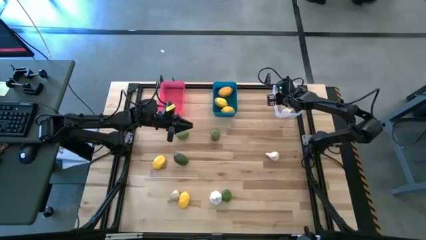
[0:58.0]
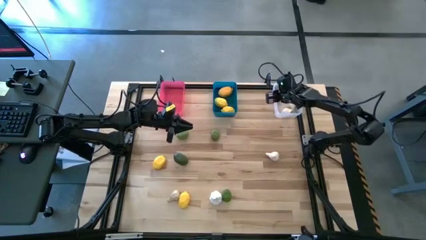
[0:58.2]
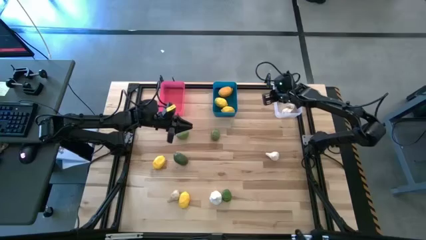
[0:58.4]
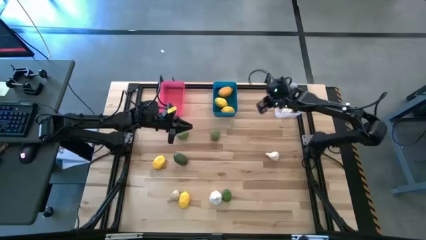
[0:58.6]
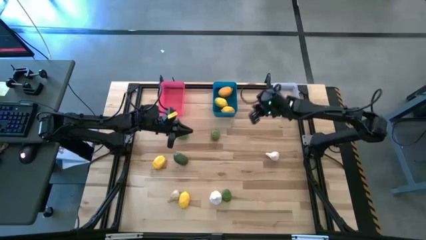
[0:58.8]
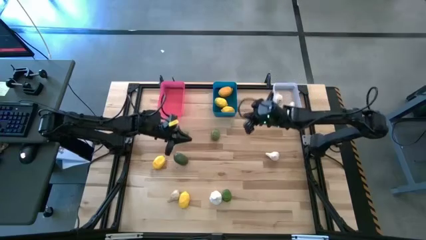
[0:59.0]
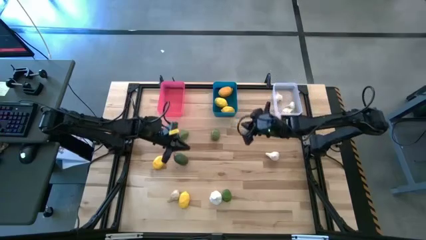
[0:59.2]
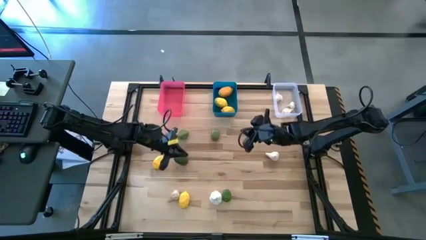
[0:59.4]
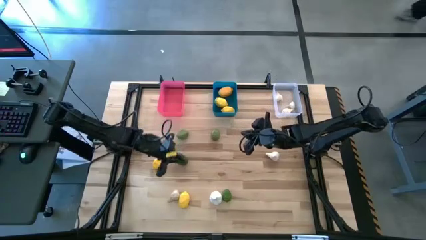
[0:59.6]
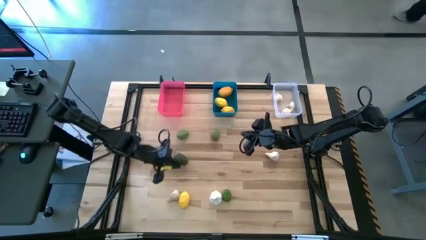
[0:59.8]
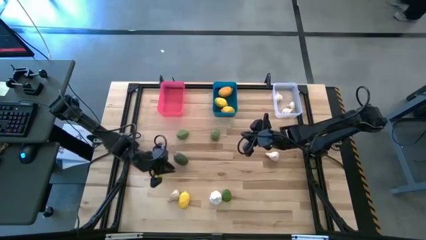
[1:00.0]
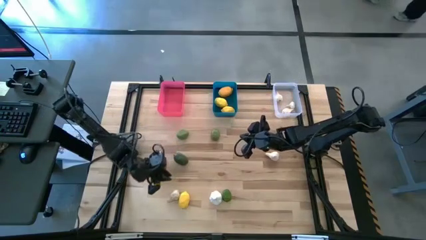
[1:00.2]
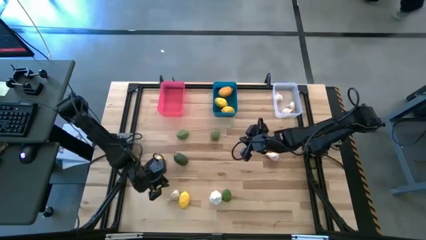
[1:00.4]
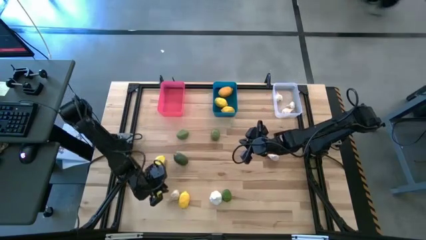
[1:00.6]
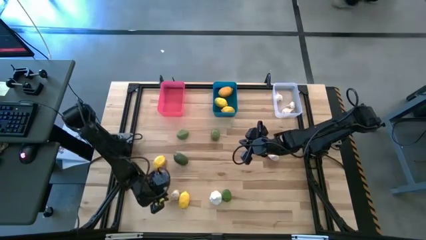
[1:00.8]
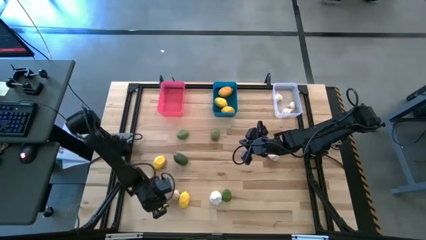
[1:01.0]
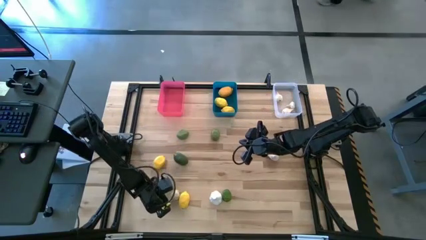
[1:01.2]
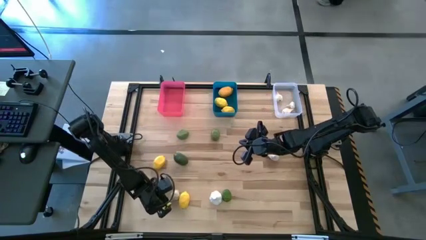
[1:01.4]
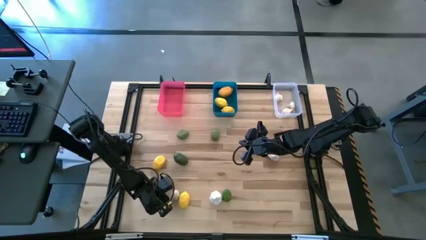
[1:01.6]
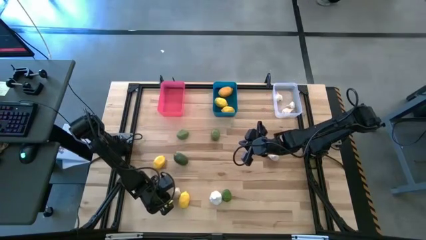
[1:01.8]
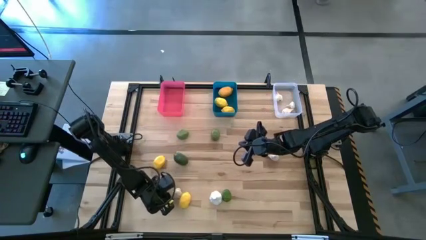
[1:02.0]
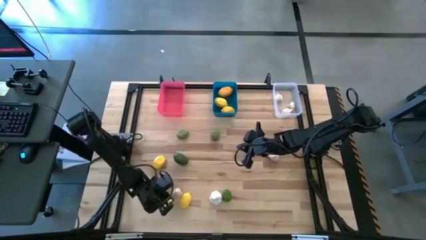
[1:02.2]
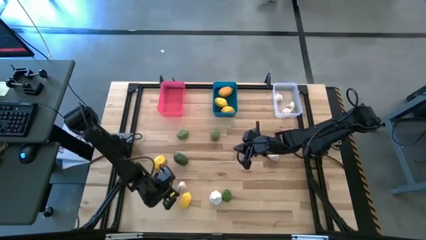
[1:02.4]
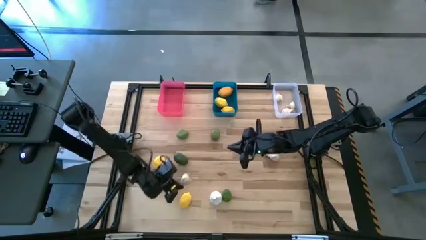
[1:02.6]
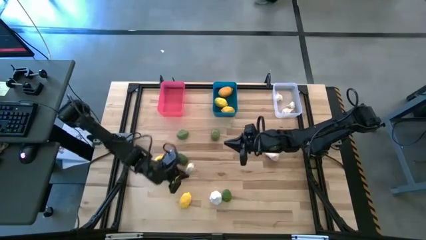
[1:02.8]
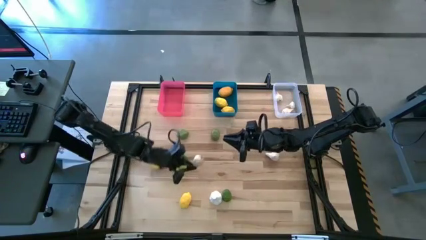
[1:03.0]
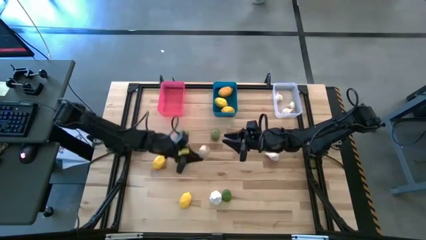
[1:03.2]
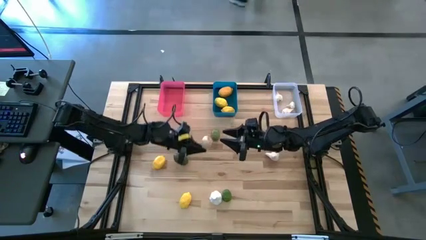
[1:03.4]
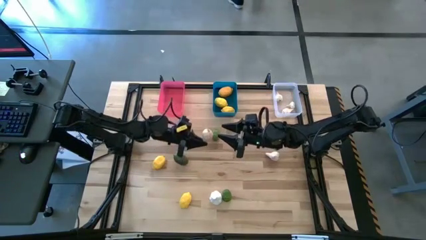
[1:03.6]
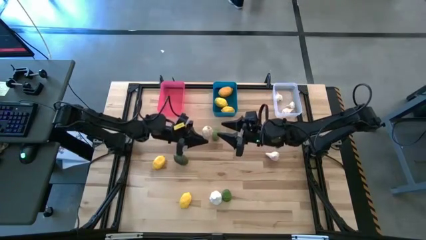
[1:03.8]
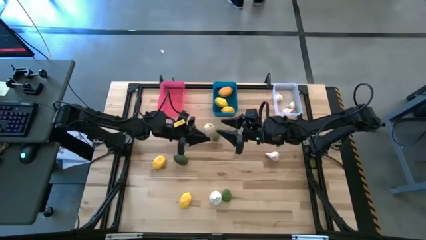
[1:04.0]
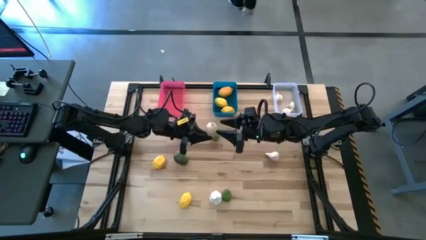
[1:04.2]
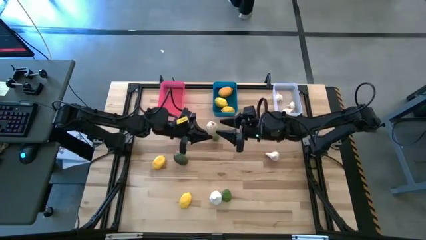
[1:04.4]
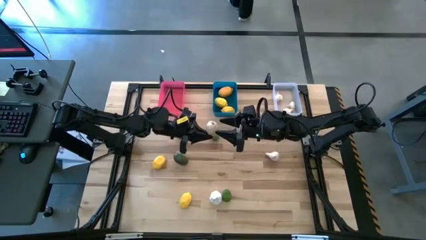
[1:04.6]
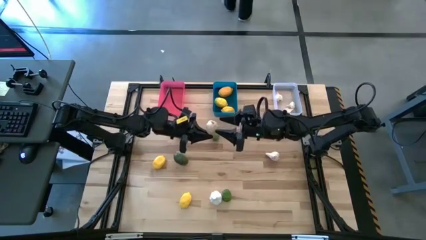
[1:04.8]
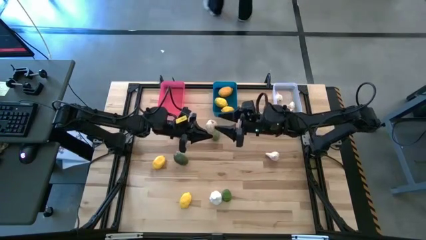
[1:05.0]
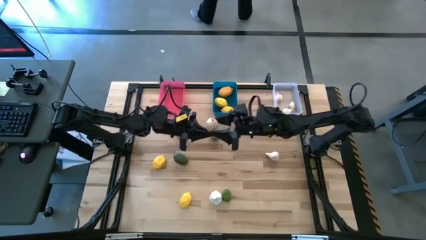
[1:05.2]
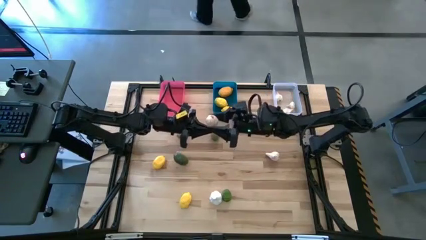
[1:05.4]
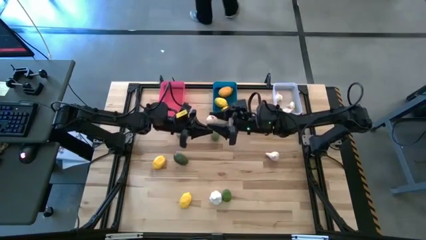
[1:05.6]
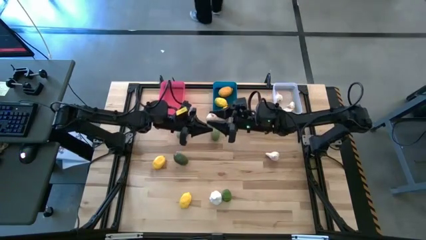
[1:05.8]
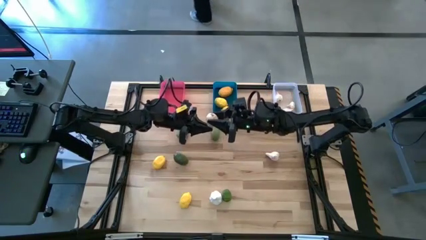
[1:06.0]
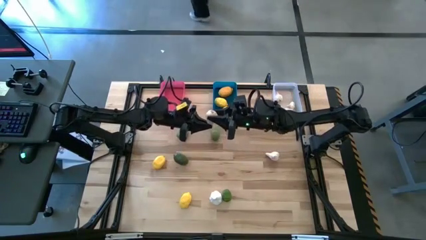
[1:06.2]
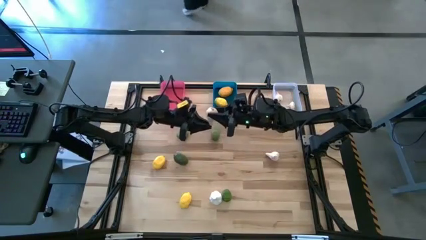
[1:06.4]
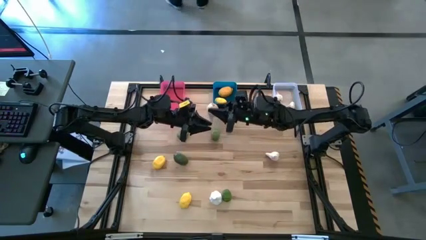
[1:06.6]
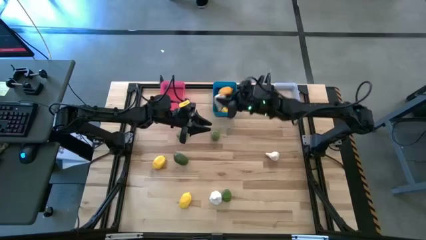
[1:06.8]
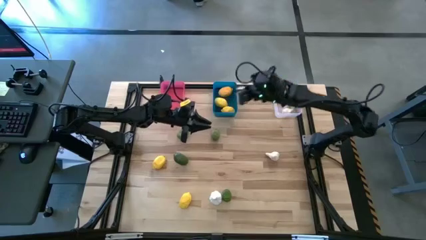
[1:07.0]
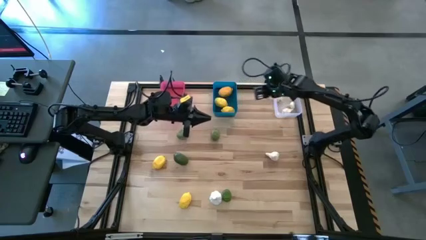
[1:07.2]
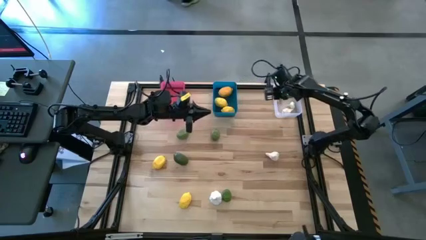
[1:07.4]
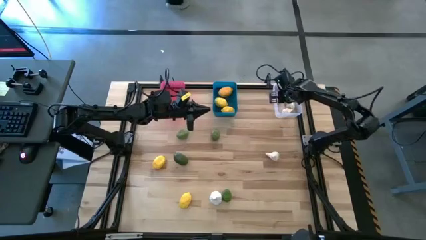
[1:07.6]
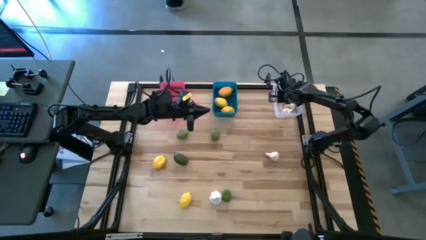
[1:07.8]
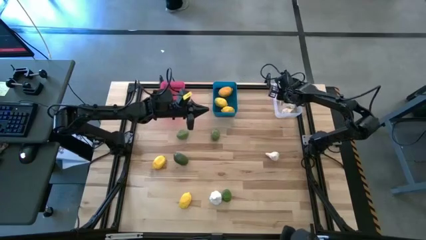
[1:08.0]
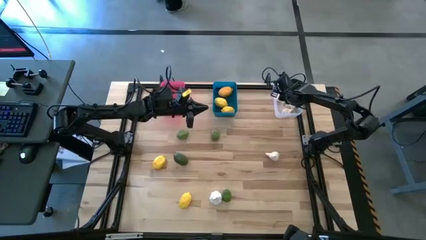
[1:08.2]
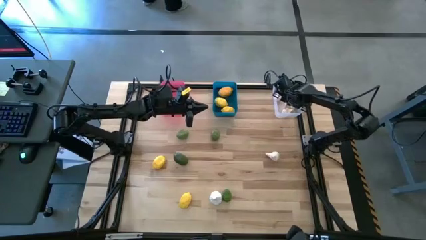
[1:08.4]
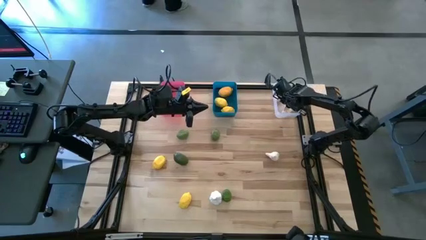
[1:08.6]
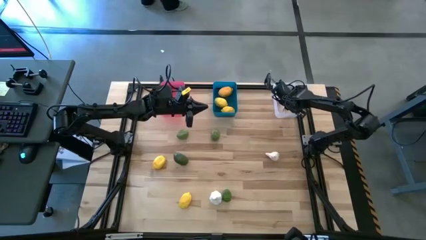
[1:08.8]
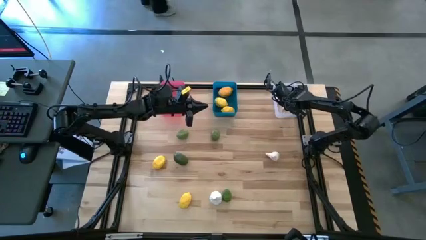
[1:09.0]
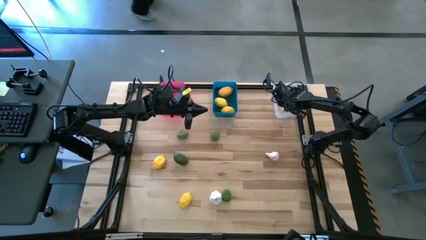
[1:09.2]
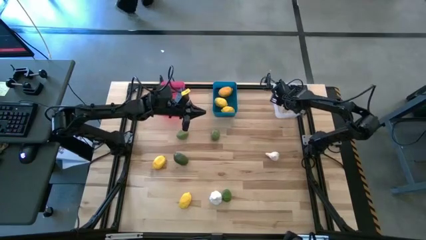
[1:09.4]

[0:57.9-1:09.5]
Task: Sort produce into baskets
Put the garlic into the white bin

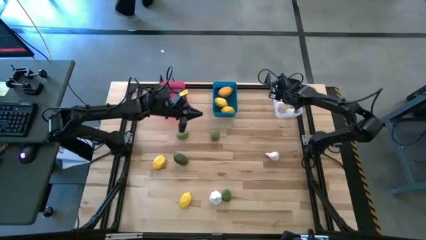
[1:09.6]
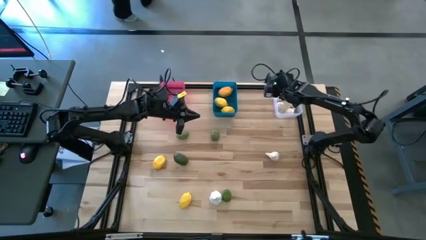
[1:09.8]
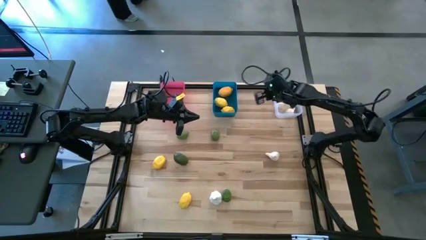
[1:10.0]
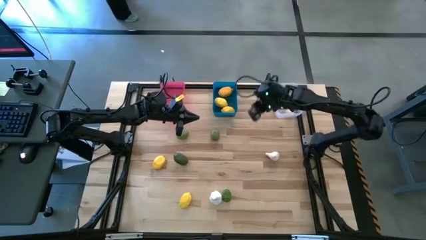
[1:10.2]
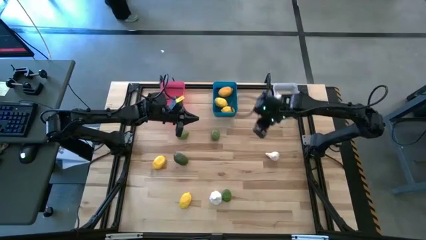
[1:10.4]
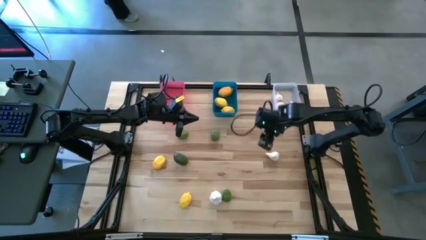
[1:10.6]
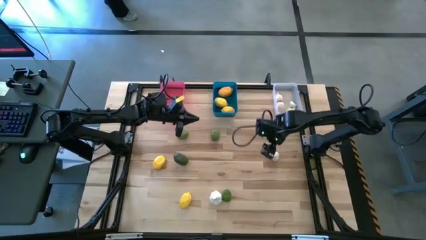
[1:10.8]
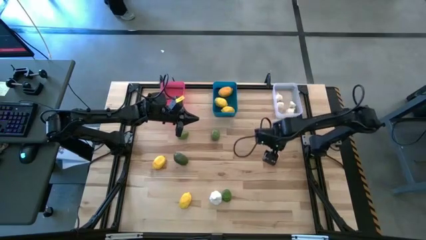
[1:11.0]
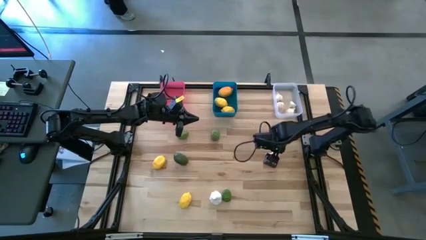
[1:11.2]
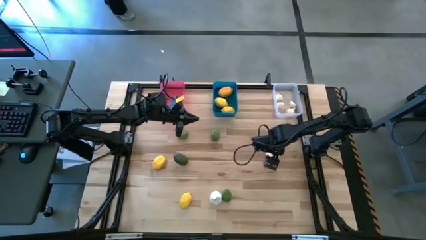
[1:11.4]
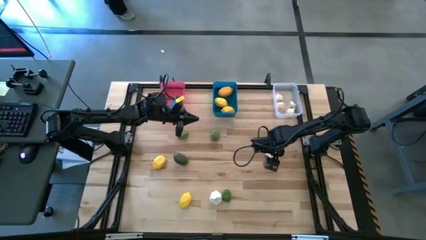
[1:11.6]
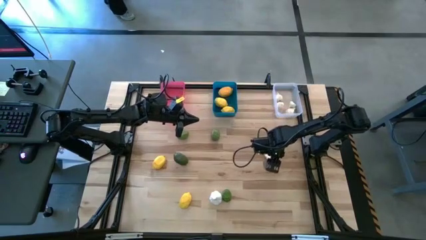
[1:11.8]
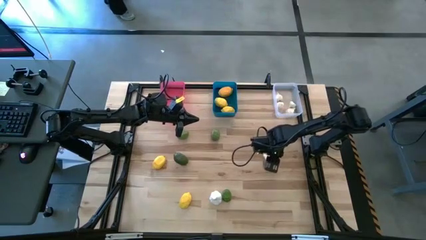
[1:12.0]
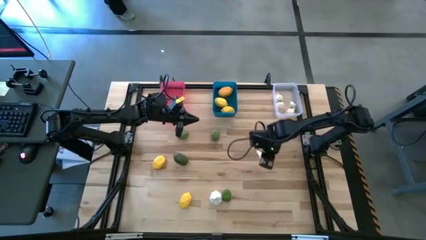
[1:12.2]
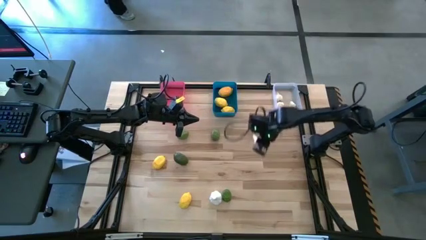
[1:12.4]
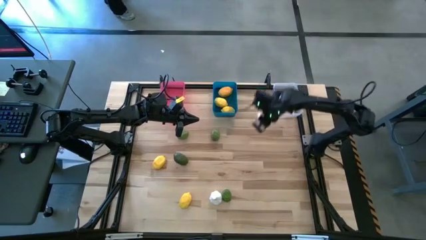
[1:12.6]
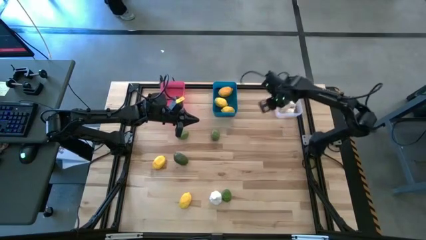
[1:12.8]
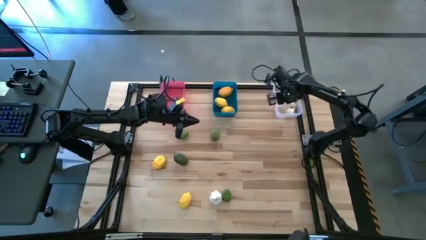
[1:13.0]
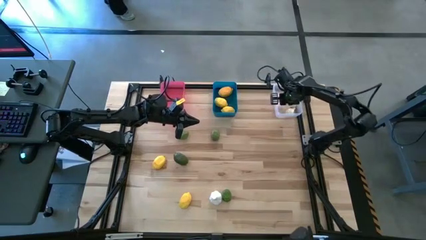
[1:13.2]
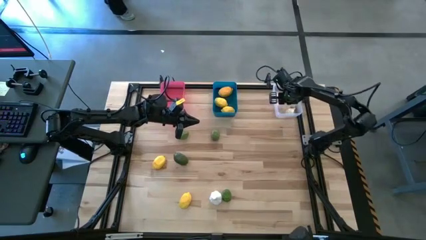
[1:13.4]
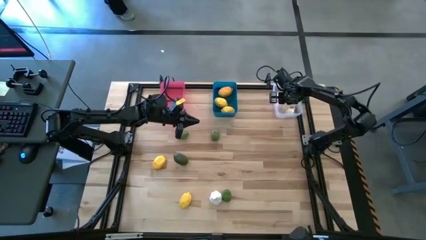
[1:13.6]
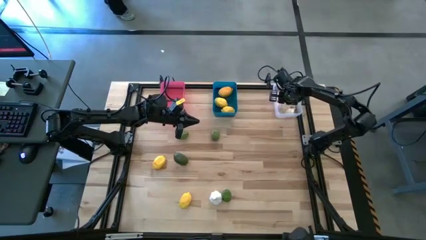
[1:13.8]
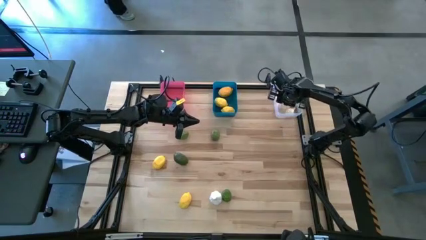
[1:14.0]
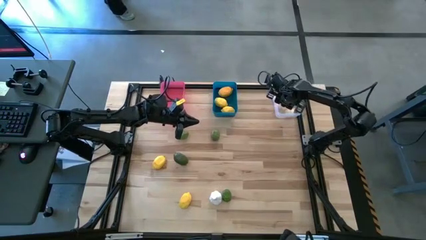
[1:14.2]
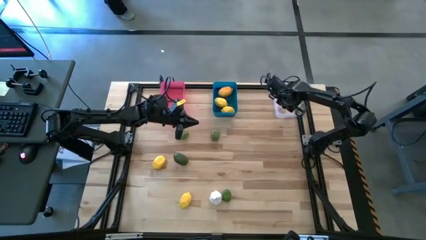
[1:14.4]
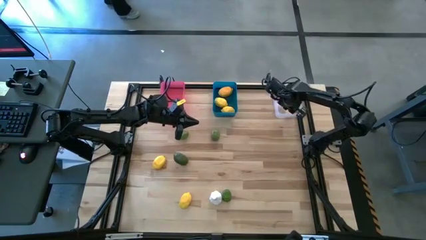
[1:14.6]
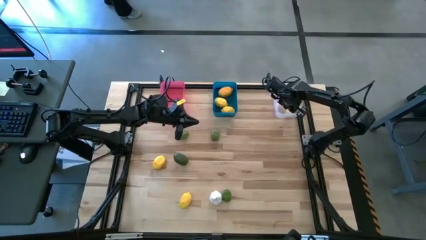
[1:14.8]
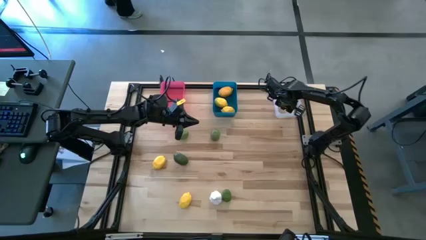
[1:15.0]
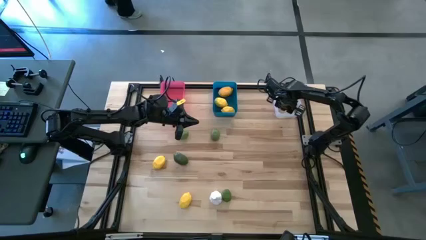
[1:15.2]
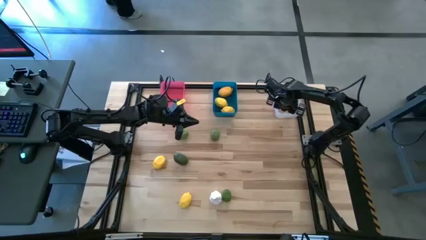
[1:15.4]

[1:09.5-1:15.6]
Put the garlic into the white bin
